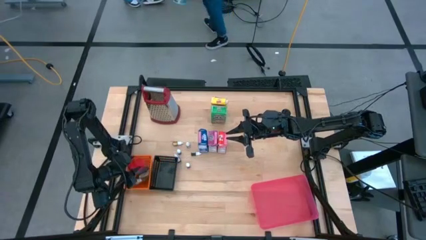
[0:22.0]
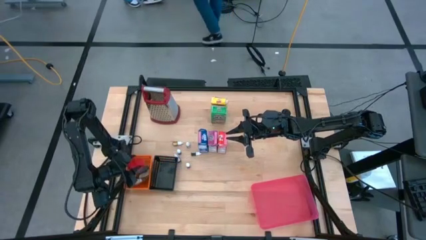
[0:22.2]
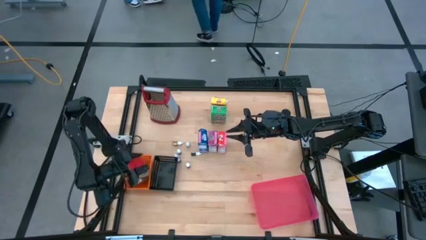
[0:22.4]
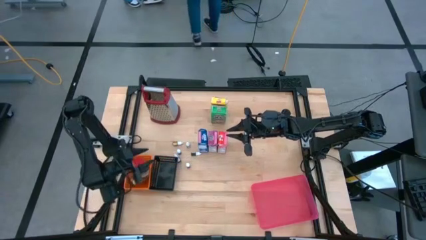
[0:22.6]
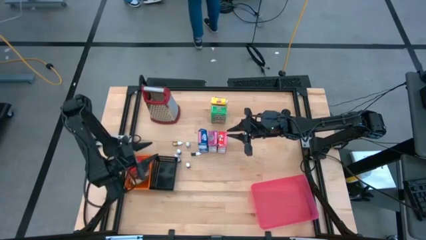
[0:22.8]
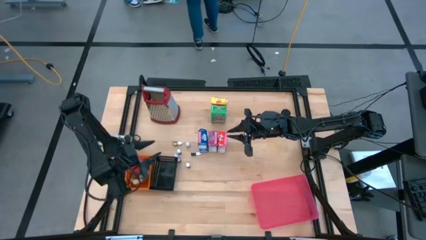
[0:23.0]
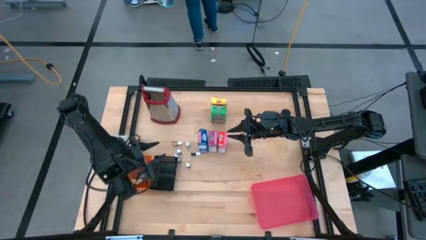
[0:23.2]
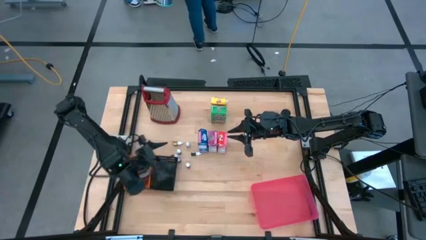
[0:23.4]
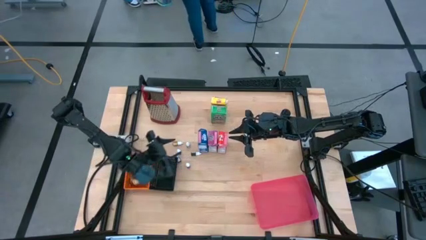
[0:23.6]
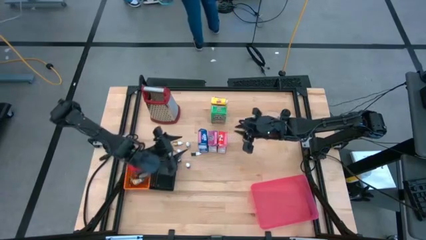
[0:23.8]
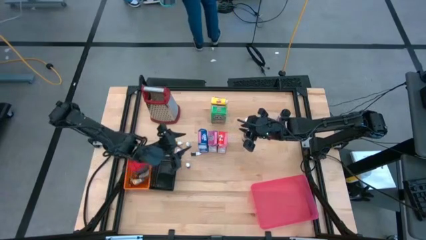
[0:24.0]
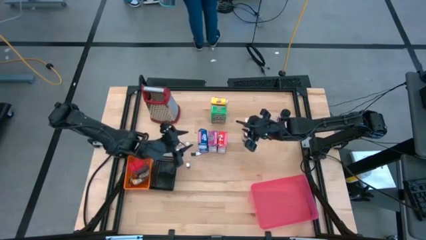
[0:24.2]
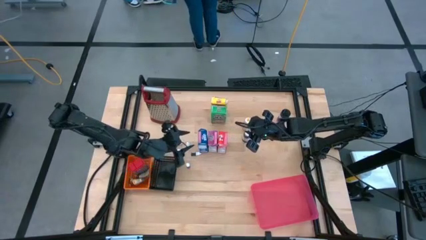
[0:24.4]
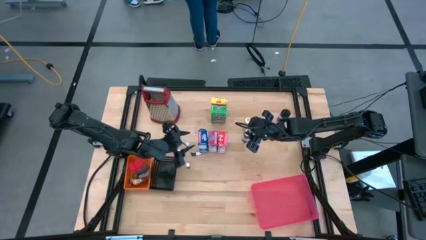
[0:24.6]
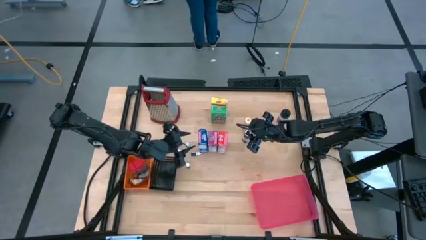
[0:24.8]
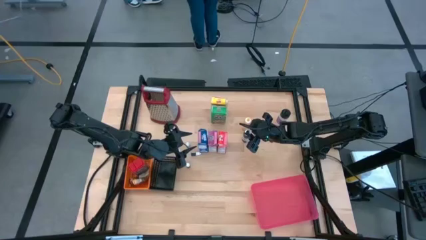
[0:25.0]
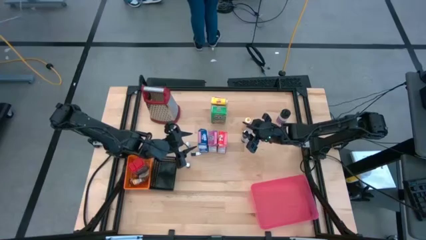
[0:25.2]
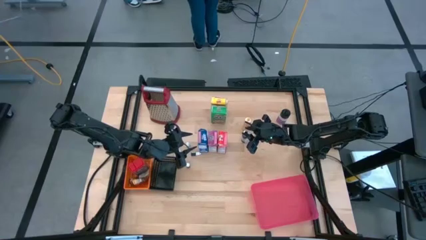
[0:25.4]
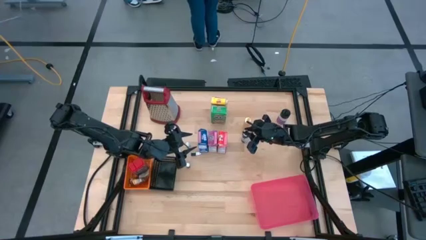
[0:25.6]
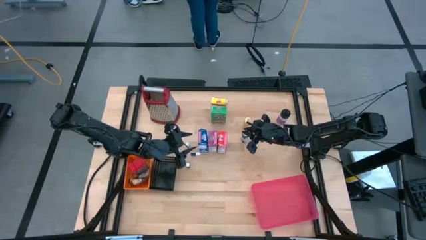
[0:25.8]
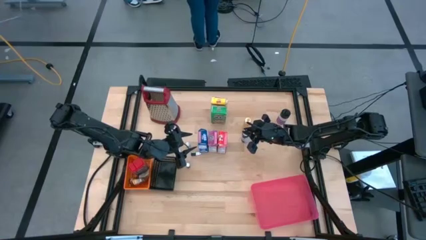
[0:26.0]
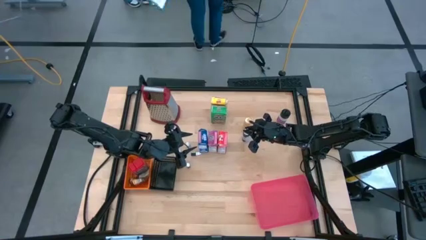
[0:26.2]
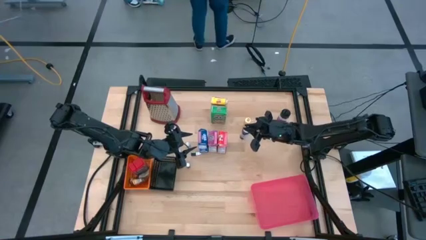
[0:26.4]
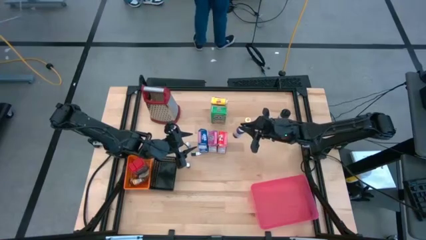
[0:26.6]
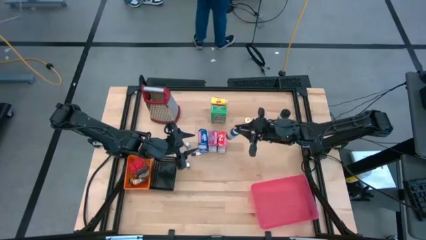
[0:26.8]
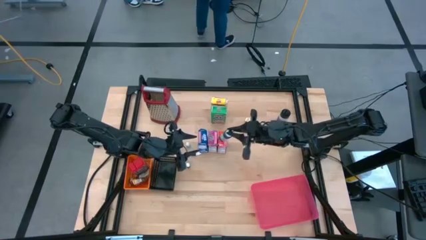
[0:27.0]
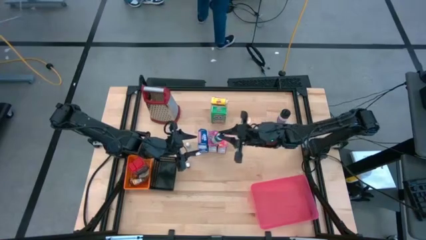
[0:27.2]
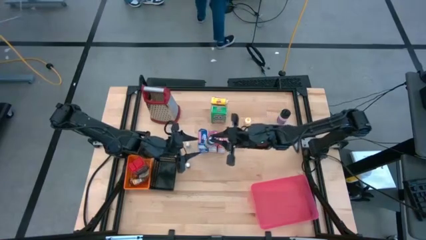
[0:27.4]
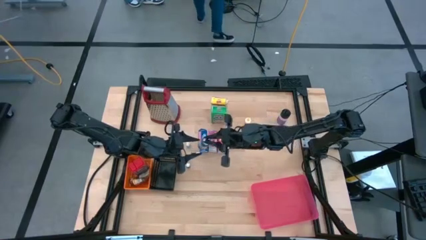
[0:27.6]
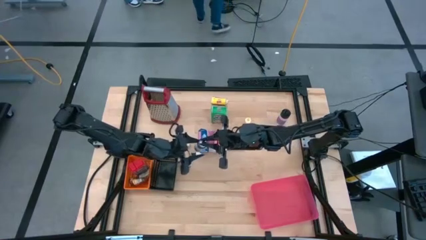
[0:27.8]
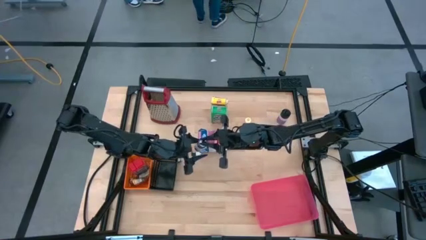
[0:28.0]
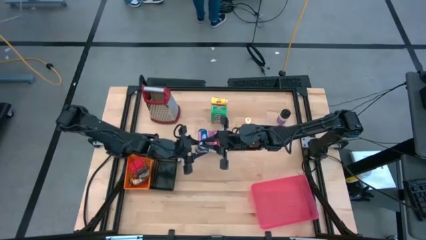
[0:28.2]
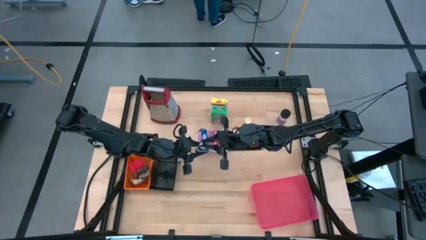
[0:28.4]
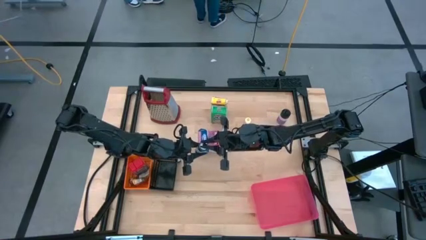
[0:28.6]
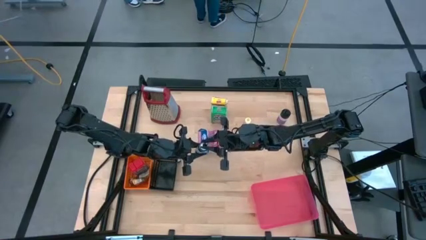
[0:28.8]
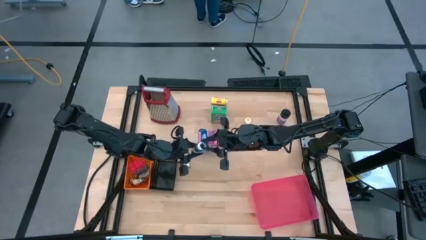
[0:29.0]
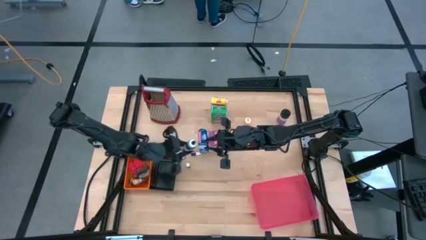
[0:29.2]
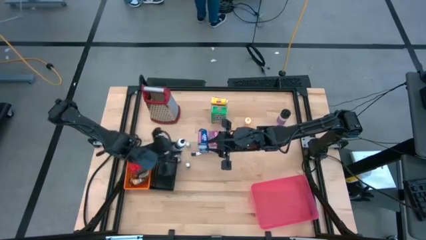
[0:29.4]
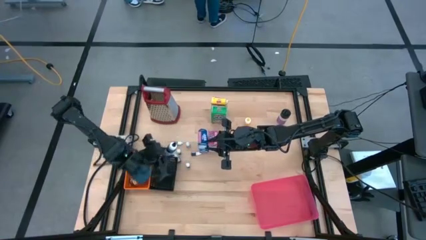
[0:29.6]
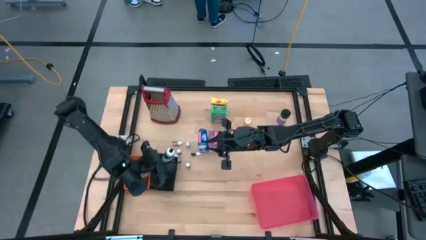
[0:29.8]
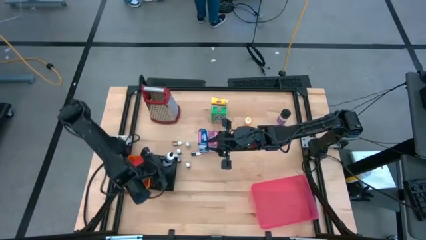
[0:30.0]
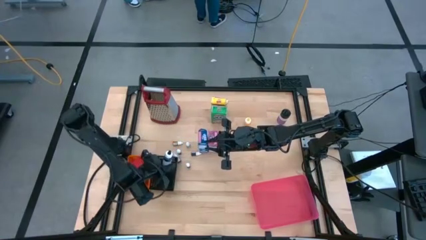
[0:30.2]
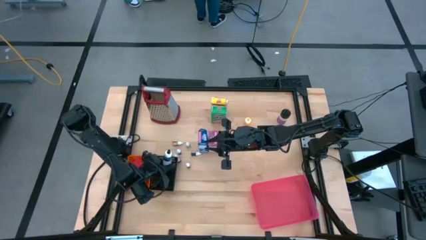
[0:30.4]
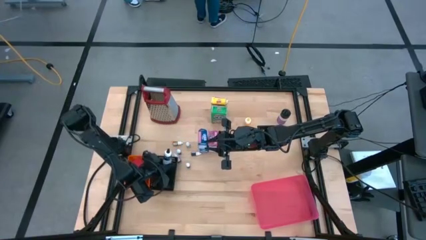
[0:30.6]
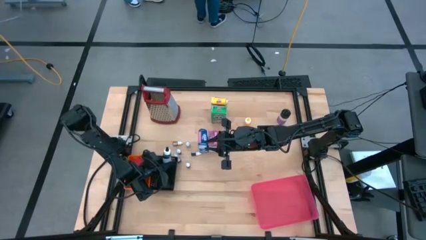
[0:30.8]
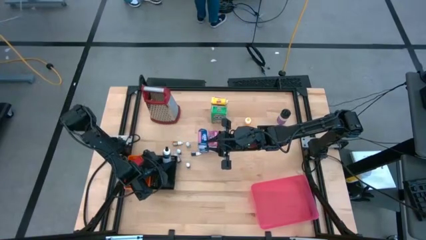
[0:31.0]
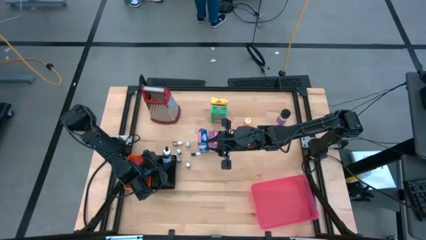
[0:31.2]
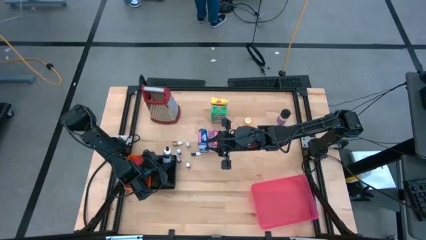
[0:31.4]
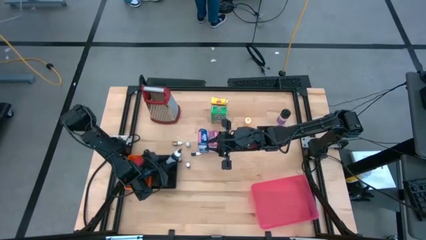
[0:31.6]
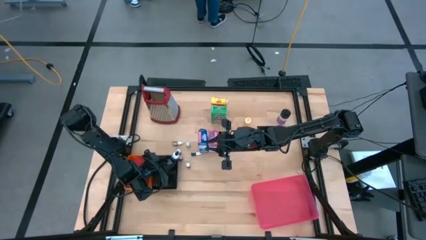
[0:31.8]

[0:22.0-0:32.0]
Task: Pick & Place Kitchen Items
Put the black food coloring bottle into the black bin

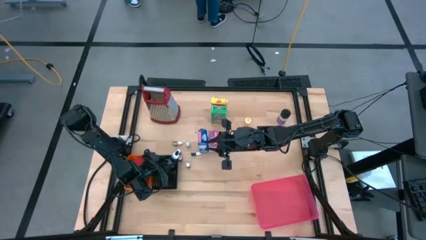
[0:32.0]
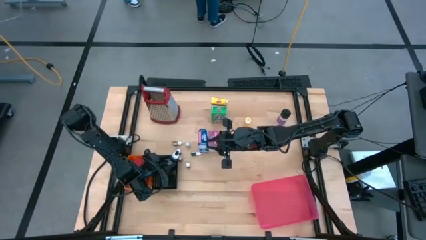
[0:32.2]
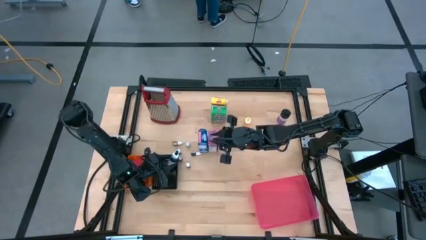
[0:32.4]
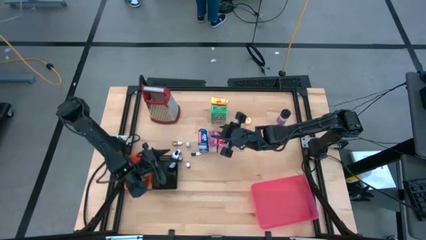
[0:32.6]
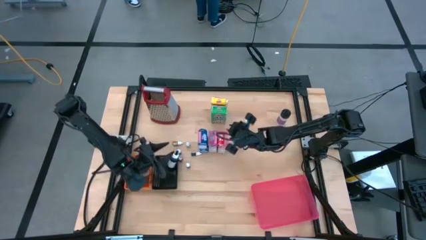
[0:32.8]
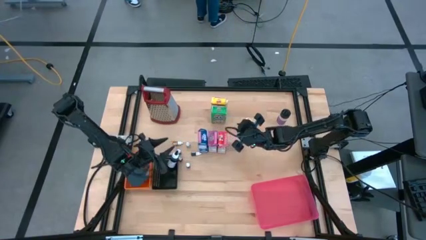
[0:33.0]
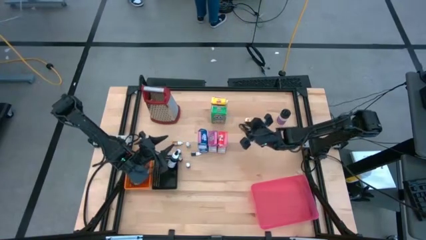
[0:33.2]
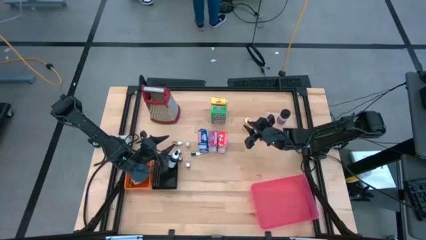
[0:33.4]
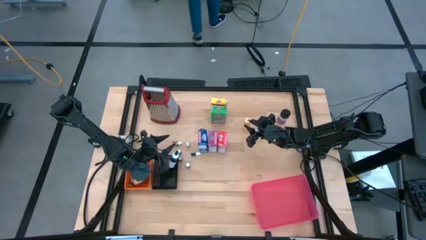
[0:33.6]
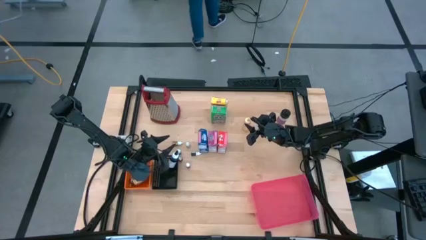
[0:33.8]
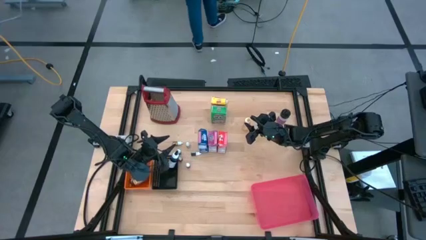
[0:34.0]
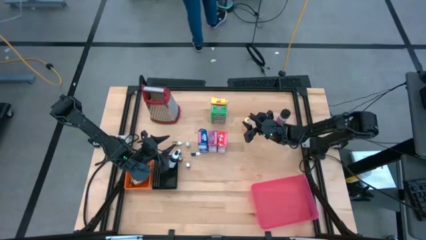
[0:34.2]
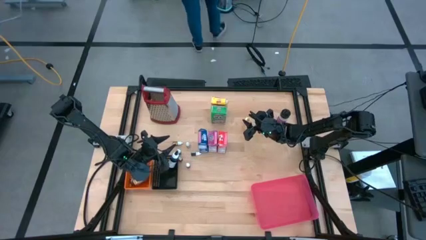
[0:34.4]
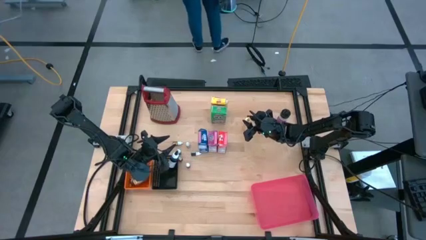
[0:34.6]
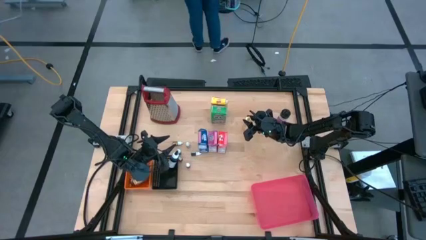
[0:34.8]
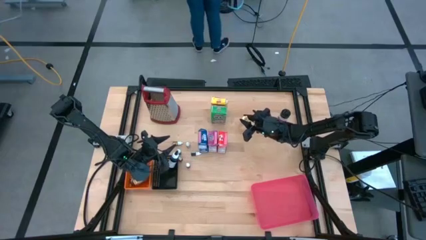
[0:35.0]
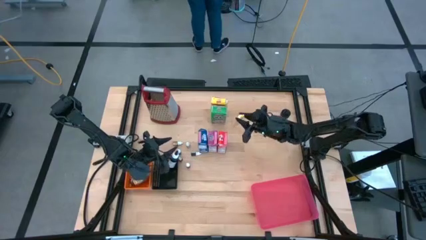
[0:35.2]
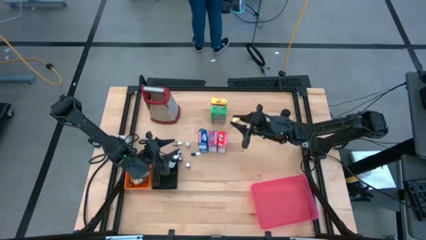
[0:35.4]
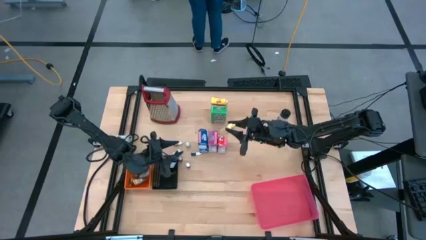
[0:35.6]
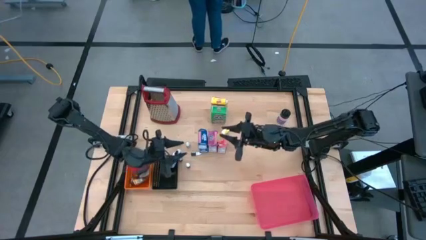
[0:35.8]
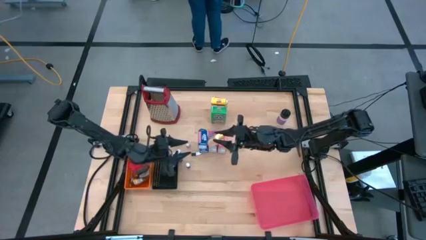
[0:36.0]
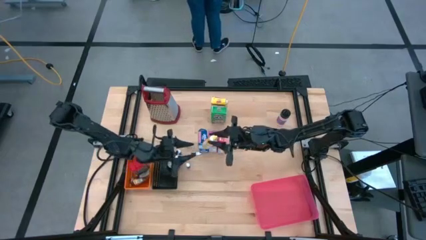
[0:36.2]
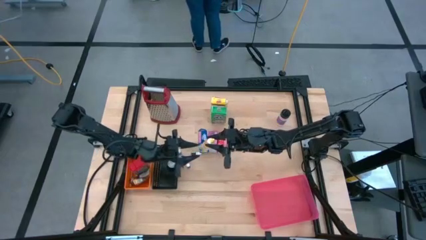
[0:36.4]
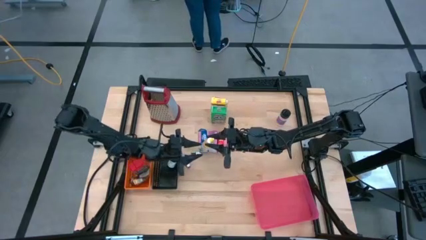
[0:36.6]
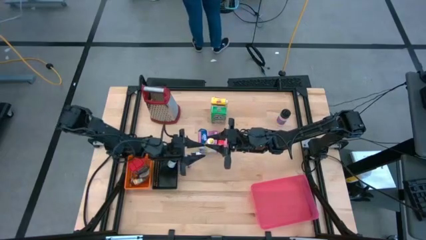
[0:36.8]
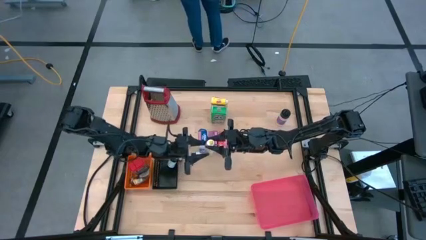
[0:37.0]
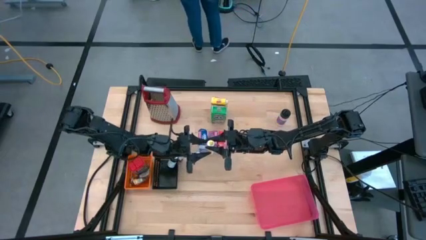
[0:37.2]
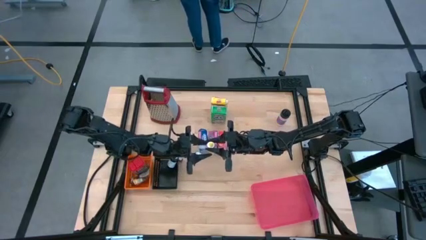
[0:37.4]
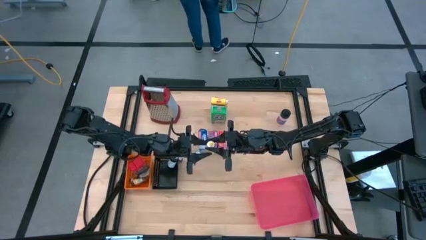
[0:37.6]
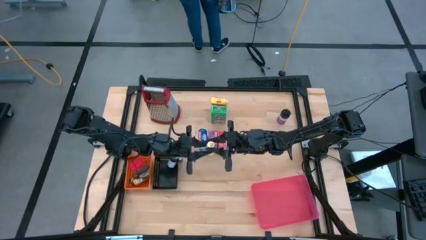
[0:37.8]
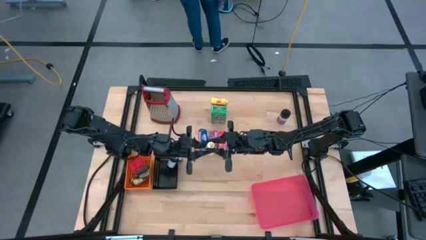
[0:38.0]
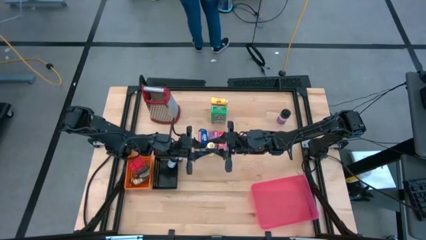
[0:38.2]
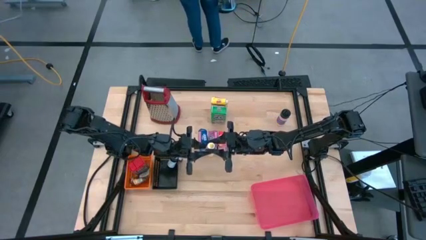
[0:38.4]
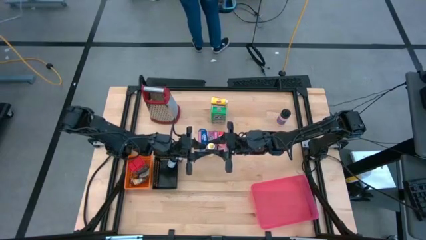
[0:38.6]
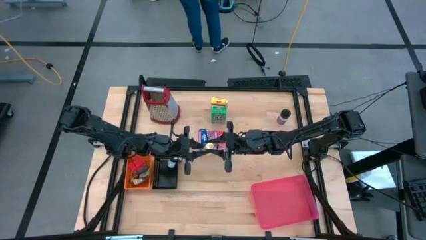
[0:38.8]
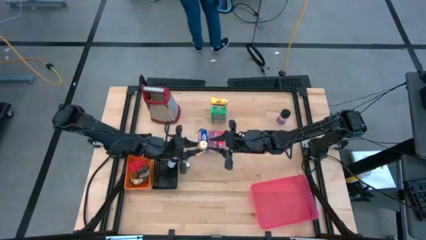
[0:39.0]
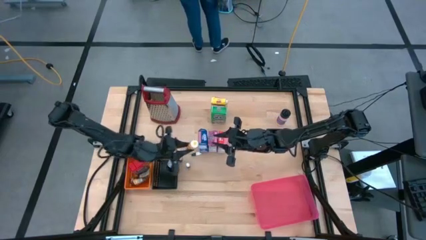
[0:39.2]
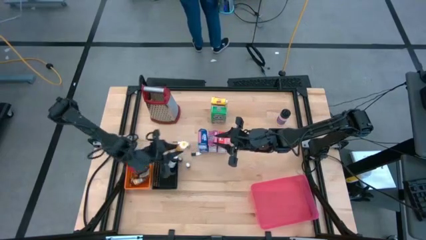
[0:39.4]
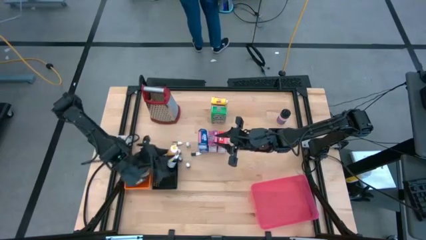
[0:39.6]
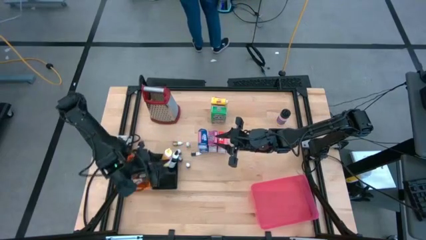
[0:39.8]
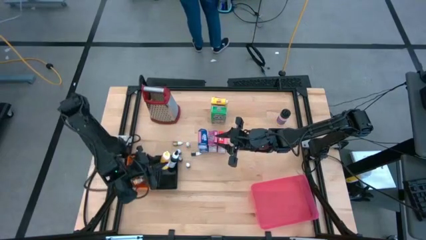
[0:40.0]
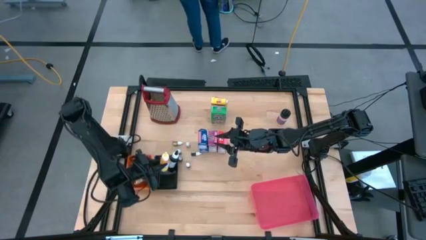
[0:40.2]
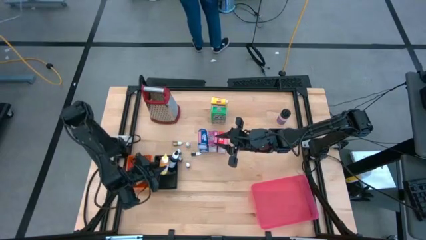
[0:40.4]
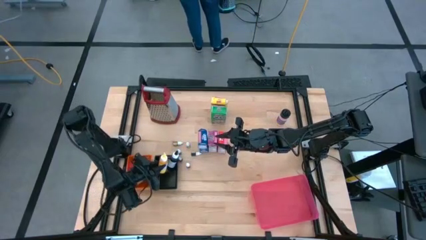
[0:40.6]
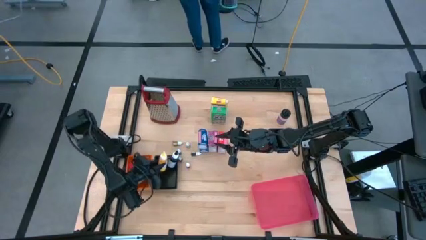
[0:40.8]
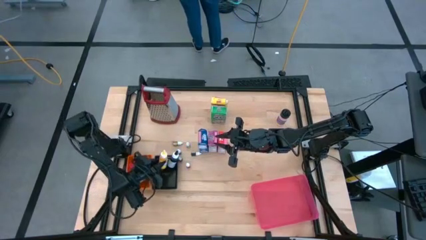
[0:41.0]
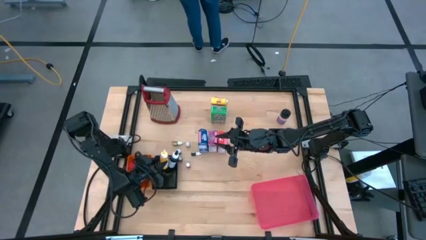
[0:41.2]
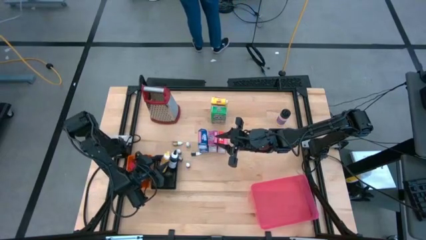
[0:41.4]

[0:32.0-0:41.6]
Put the yellow food coloring bottle into the black bin
